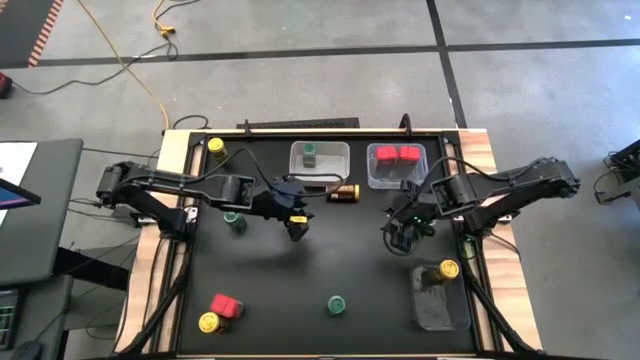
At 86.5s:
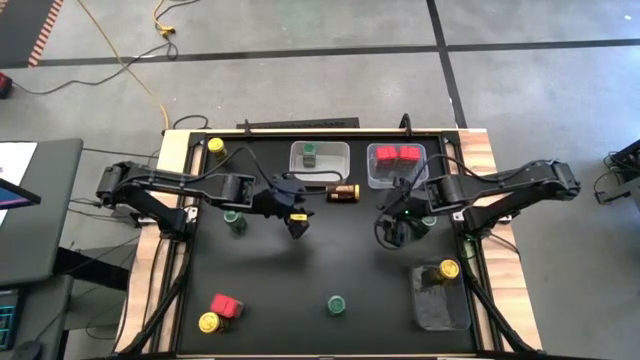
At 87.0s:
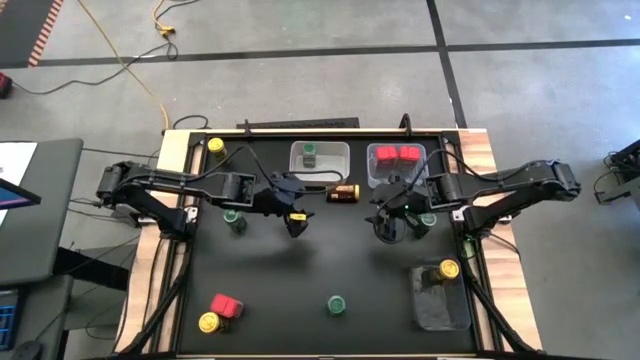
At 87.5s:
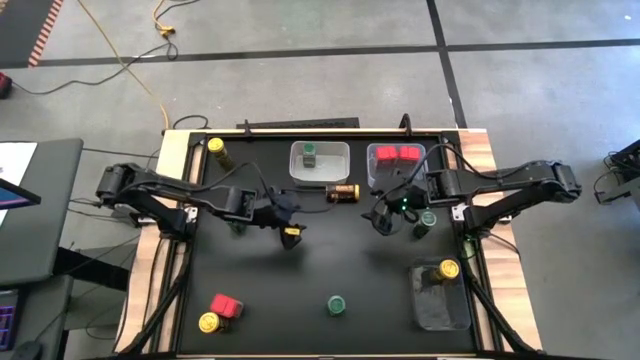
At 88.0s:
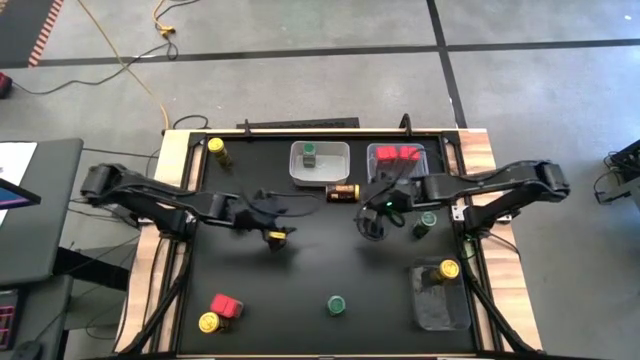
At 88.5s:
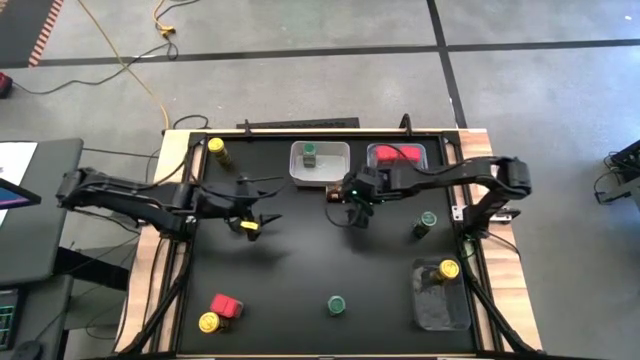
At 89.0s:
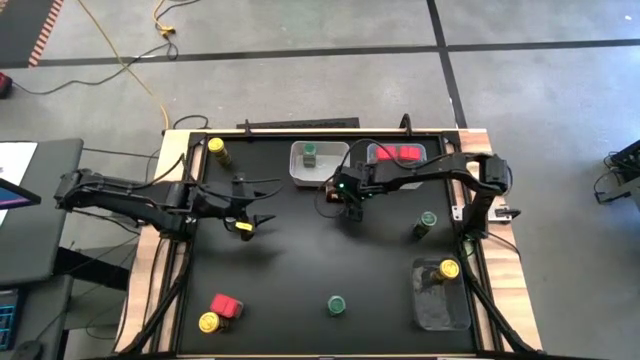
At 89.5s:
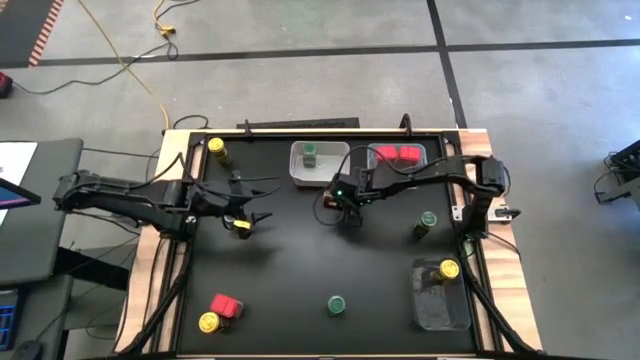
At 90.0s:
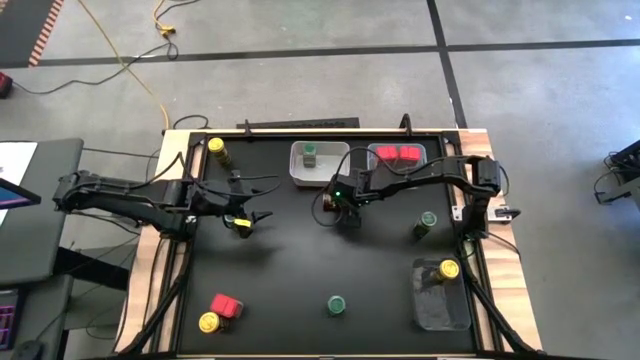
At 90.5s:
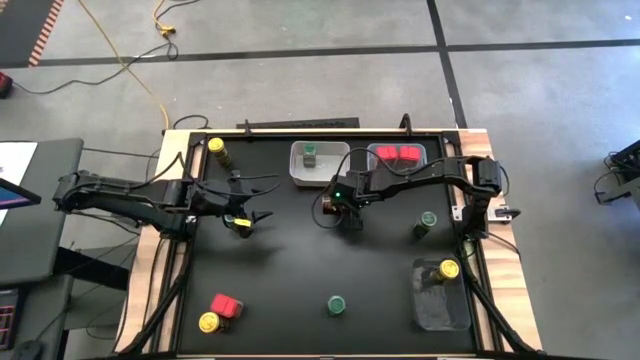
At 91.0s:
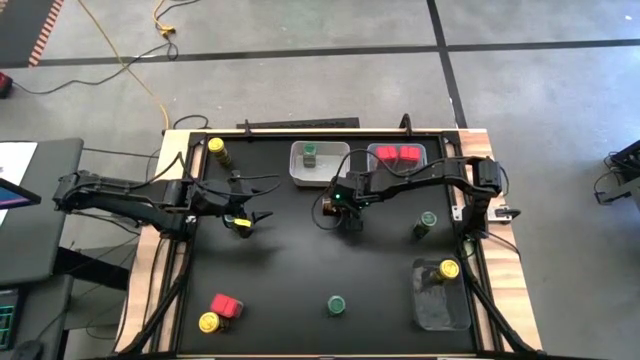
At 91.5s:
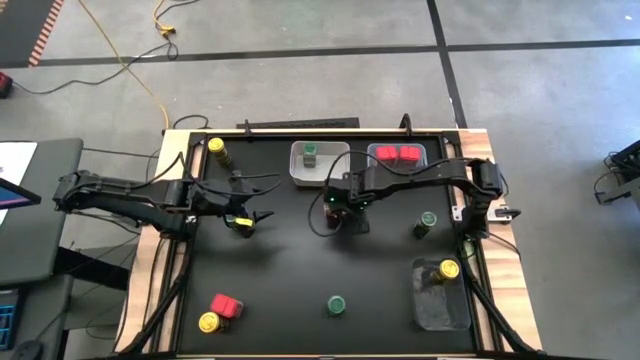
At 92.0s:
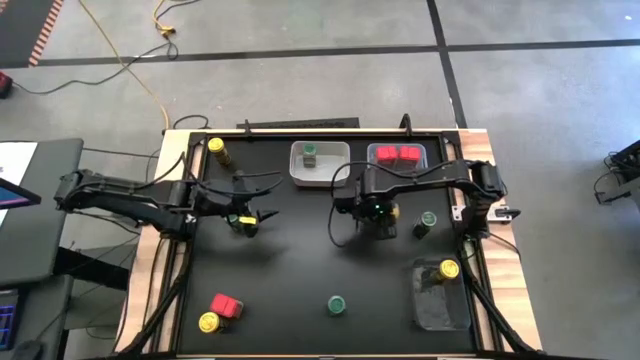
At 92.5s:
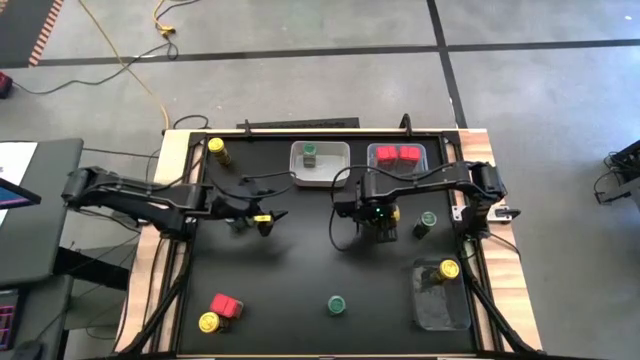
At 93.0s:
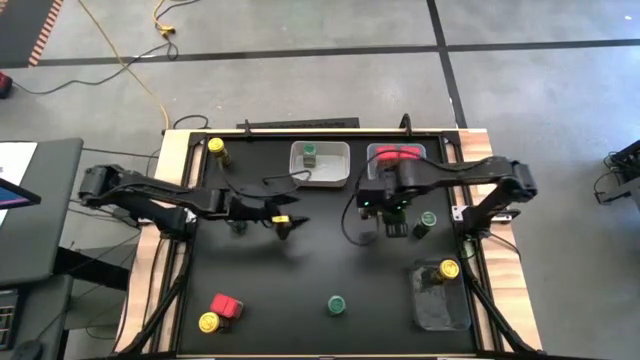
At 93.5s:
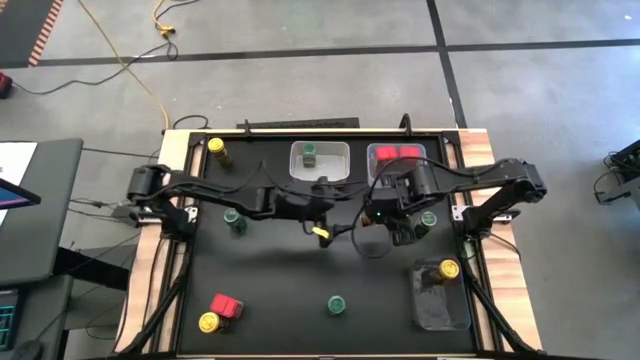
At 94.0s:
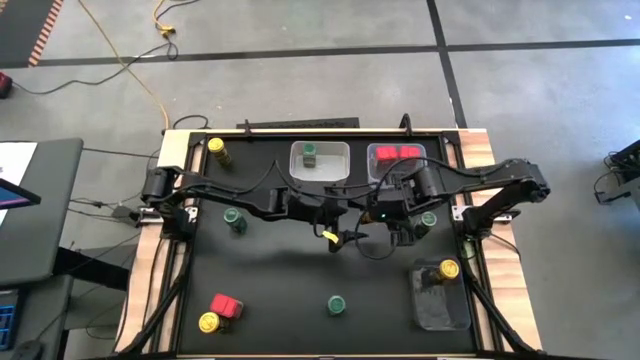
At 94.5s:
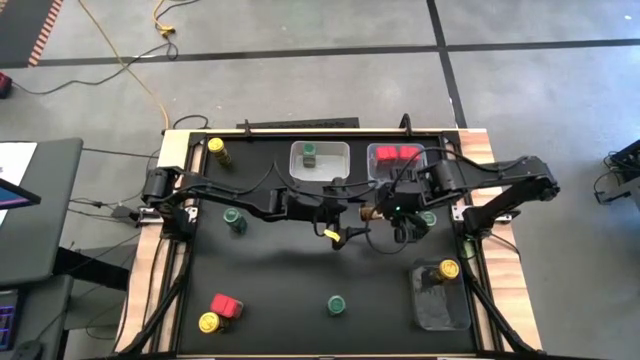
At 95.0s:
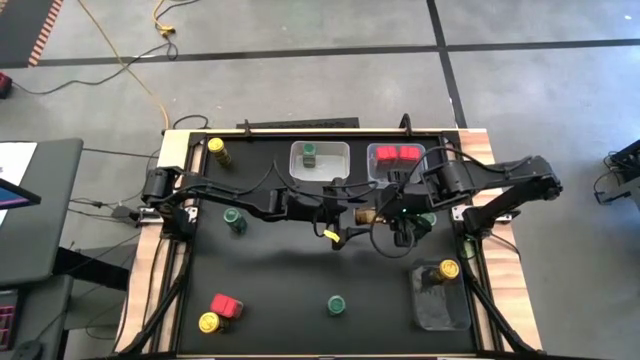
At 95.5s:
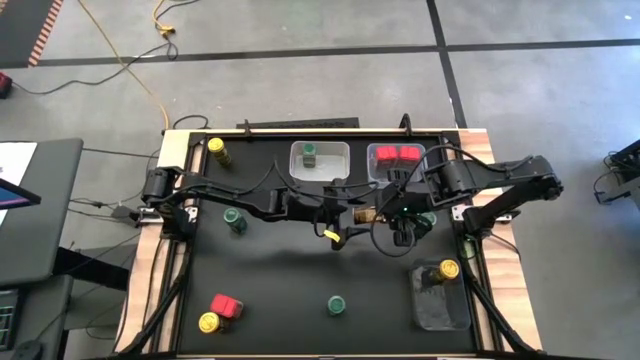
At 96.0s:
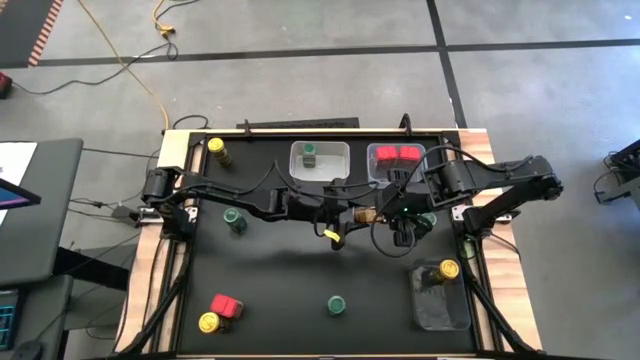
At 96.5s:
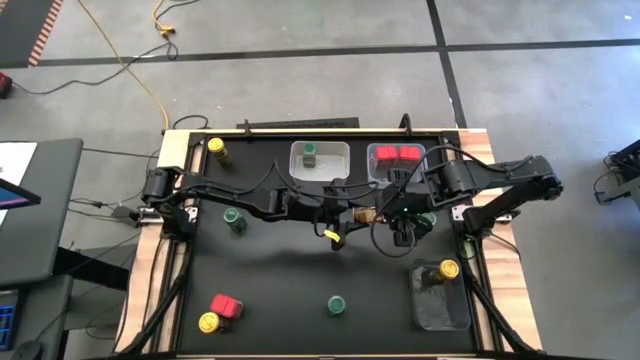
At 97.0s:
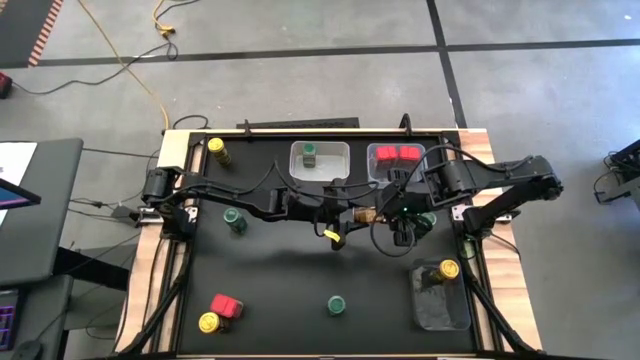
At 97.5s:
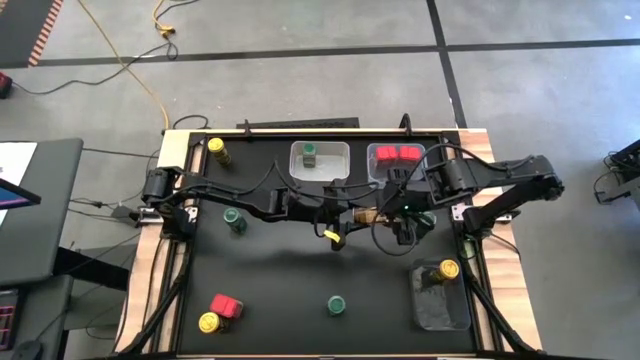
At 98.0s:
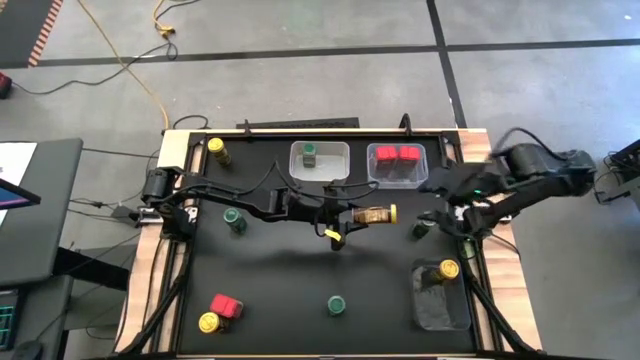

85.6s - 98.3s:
Task: Sort spices by type
Put the right yellow seasoning can into the black bin

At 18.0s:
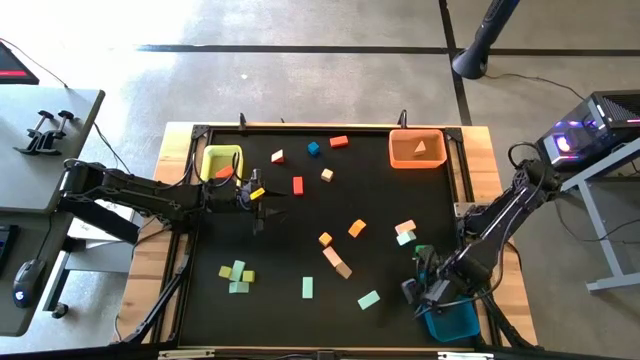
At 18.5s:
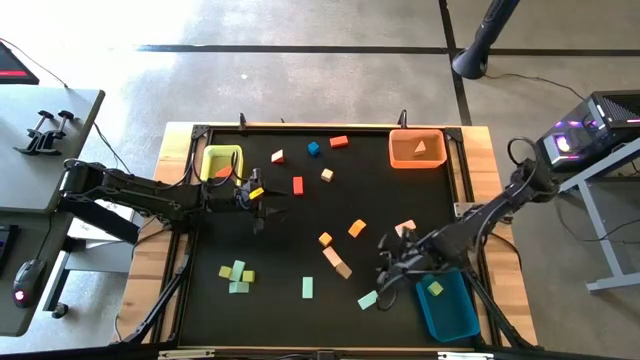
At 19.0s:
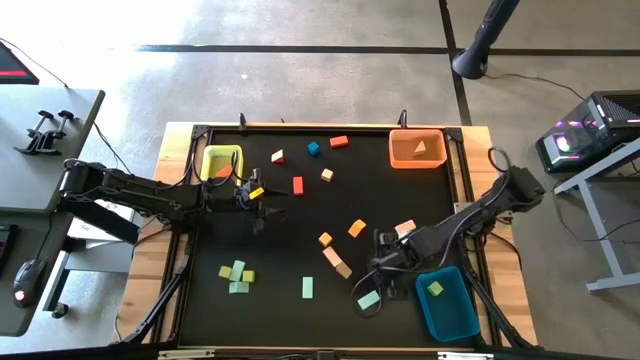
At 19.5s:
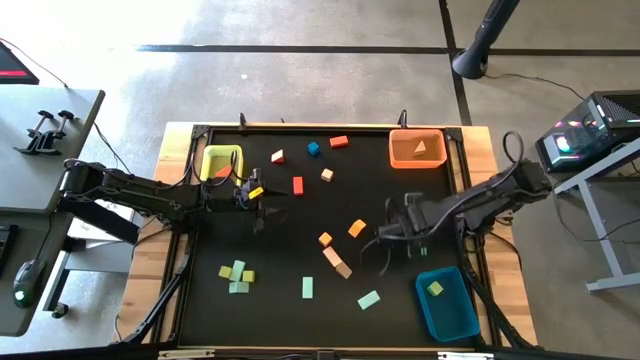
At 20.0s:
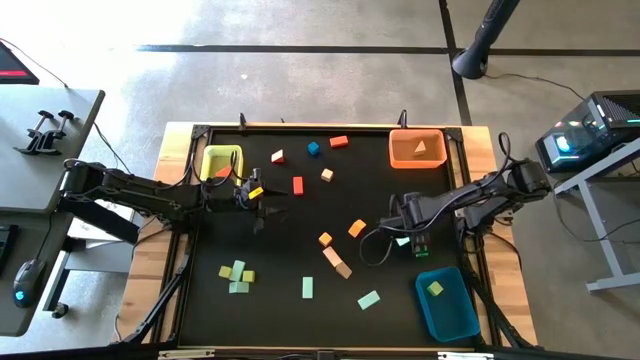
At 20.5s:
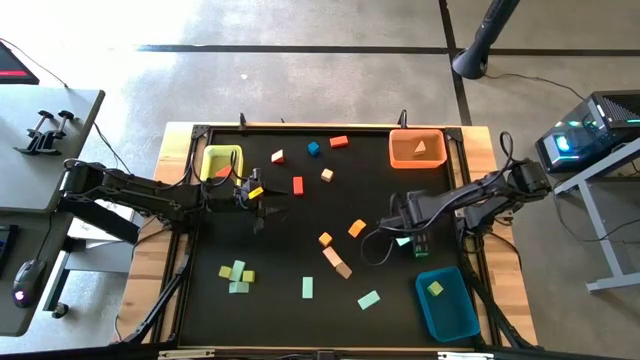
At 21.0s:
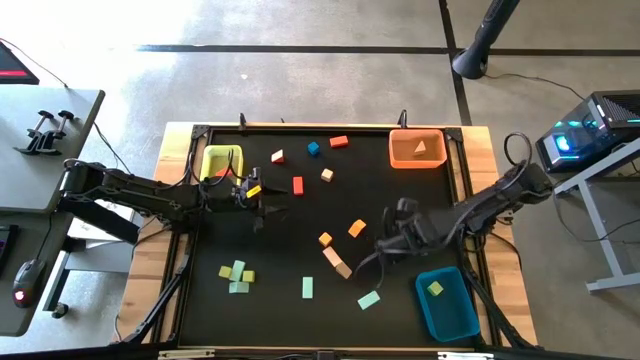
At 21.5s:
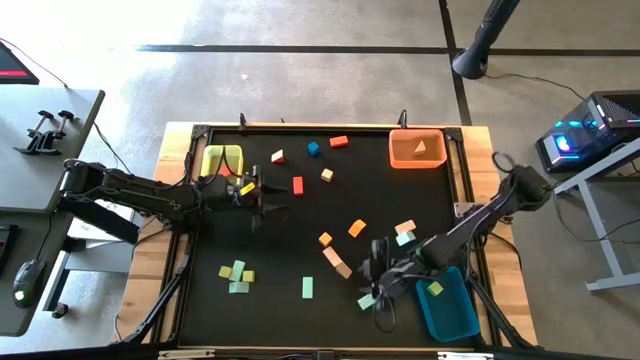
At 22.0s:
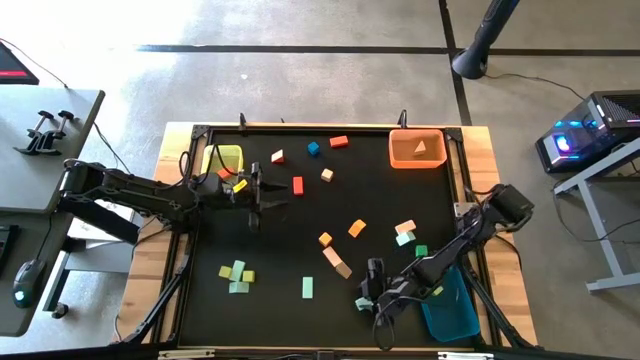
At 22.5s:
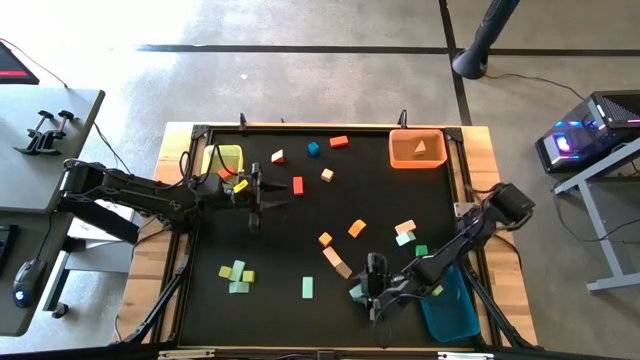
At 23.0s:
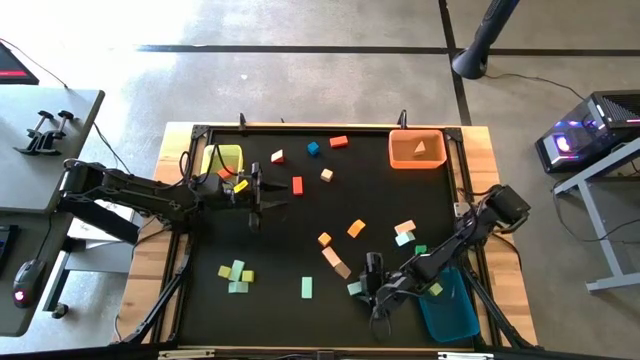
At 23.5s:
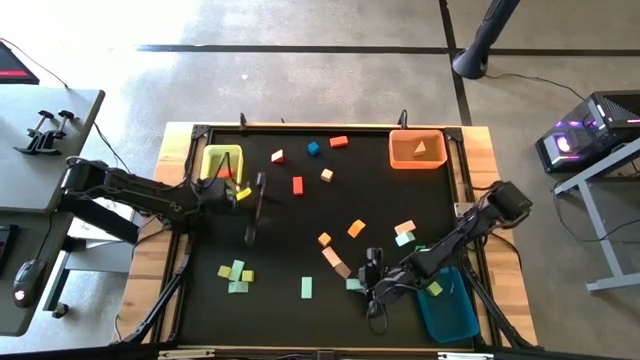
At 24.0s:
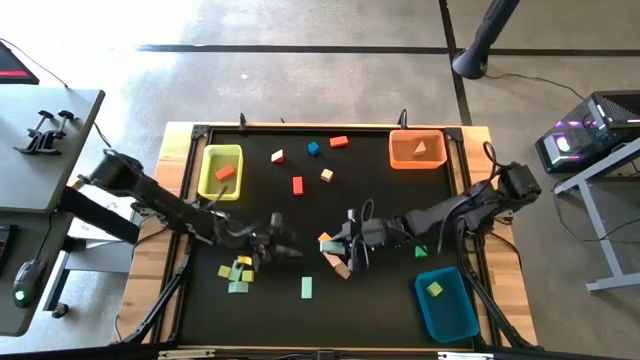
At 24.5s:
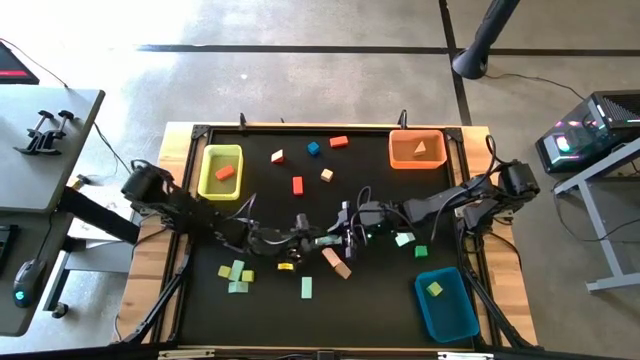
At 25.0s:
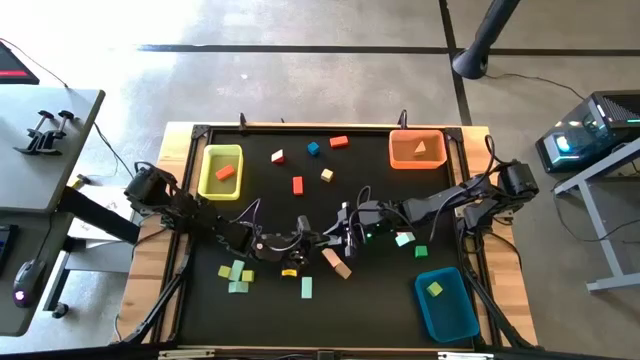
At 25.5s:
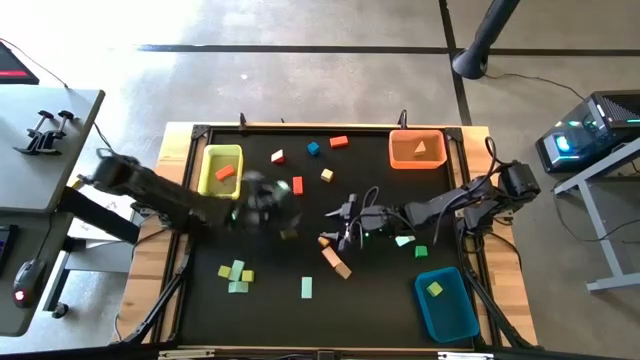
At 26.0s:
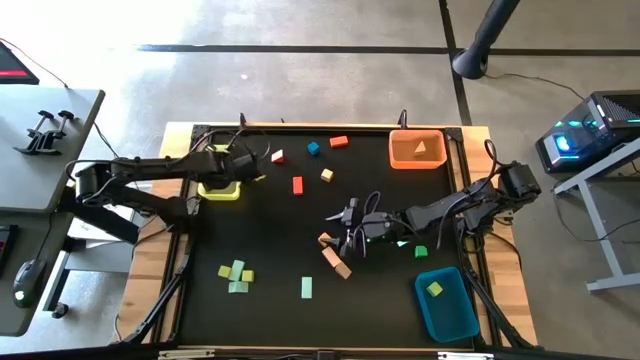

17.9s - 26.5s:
Task: Sort blocks by size
Put the light blue rectangular block into the yellow bin
